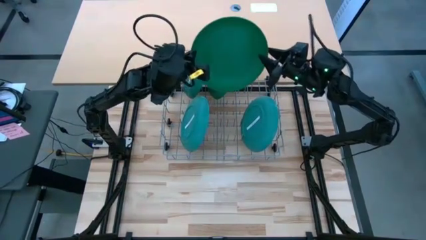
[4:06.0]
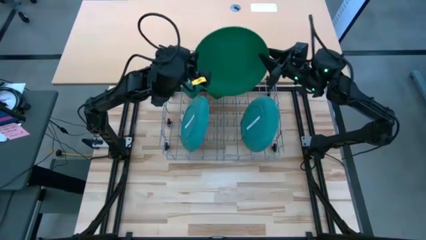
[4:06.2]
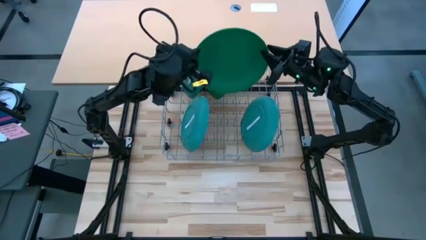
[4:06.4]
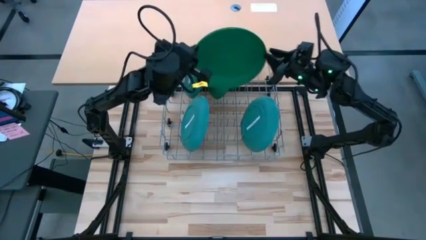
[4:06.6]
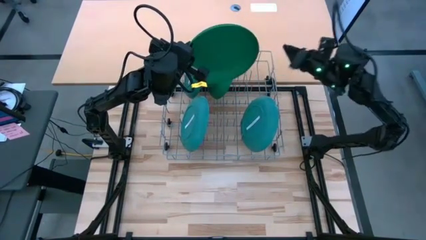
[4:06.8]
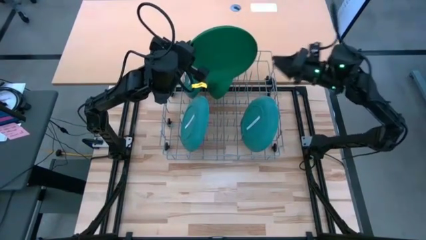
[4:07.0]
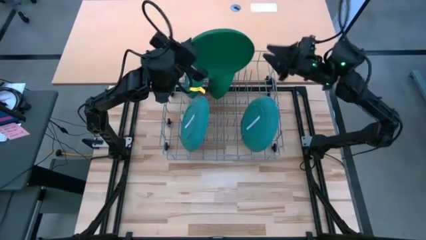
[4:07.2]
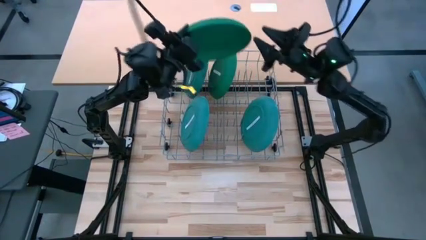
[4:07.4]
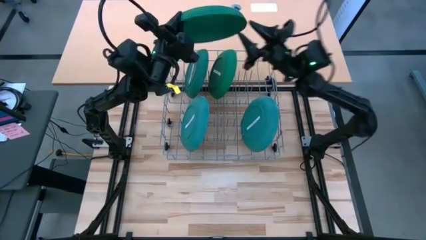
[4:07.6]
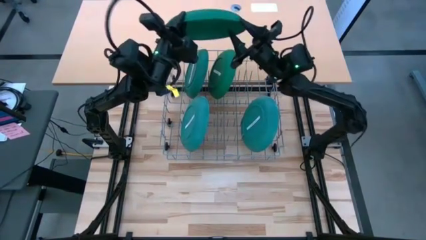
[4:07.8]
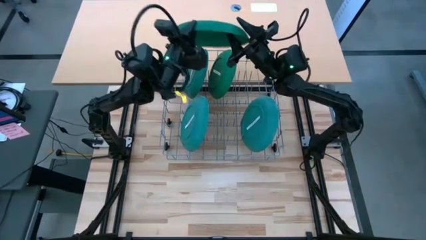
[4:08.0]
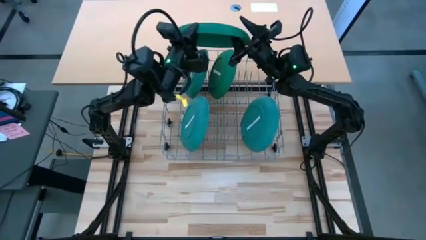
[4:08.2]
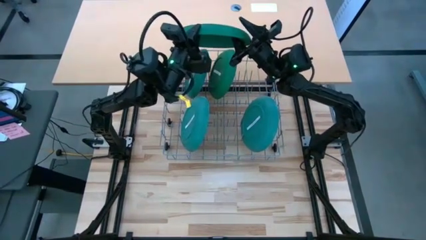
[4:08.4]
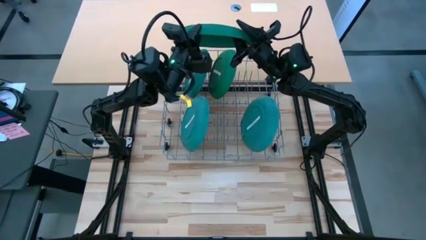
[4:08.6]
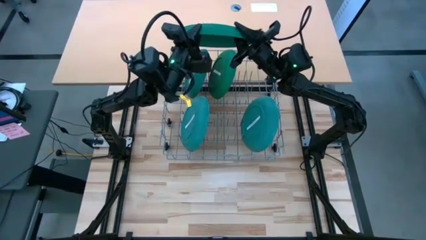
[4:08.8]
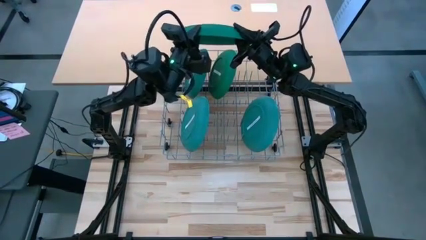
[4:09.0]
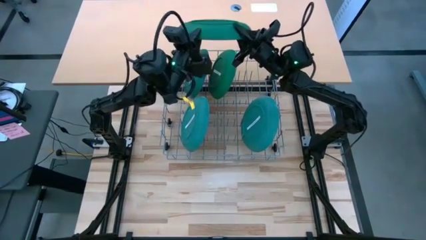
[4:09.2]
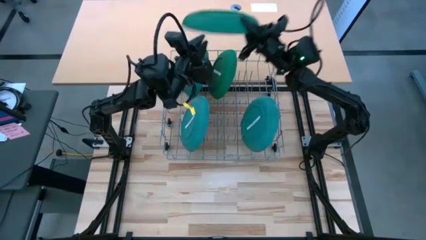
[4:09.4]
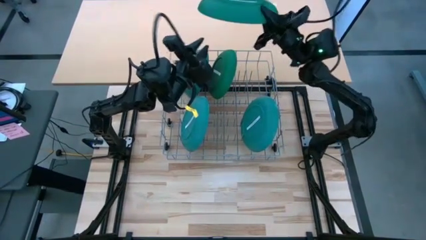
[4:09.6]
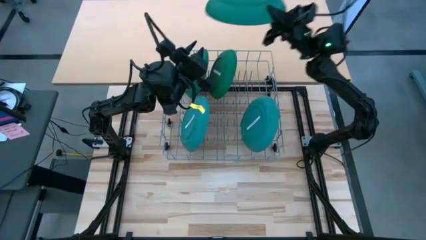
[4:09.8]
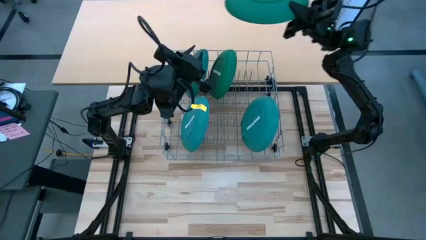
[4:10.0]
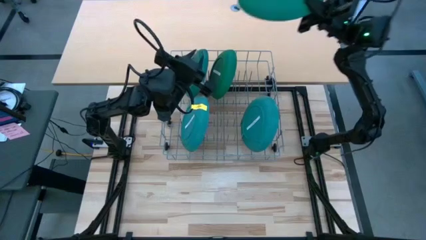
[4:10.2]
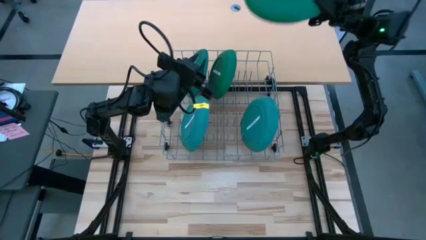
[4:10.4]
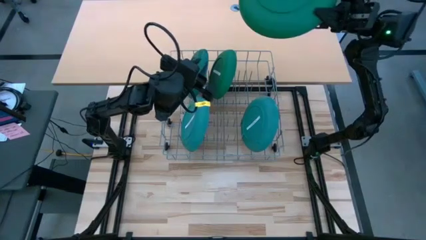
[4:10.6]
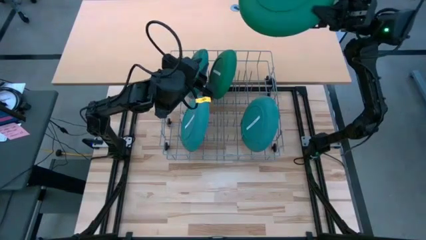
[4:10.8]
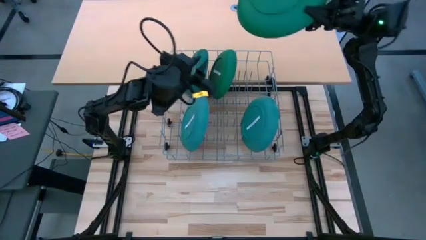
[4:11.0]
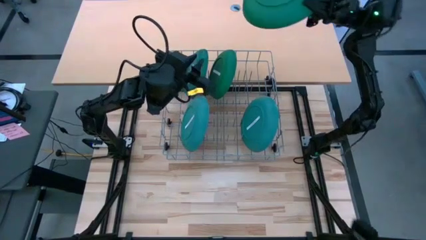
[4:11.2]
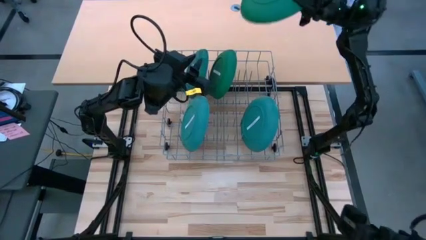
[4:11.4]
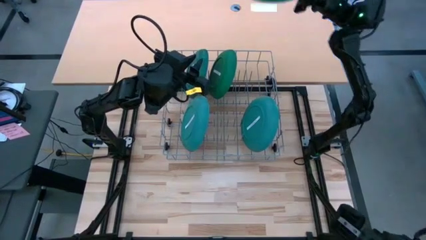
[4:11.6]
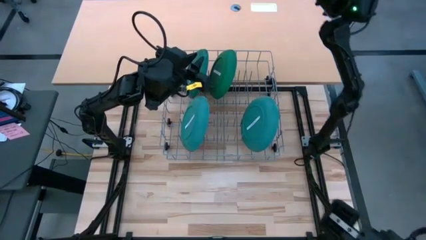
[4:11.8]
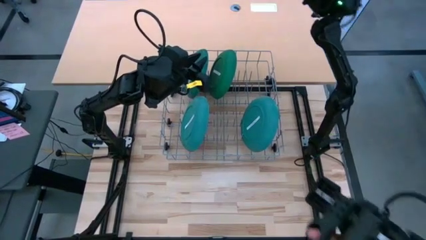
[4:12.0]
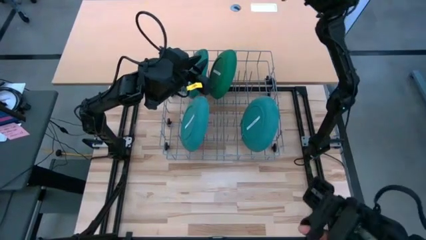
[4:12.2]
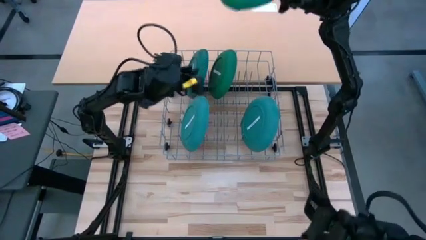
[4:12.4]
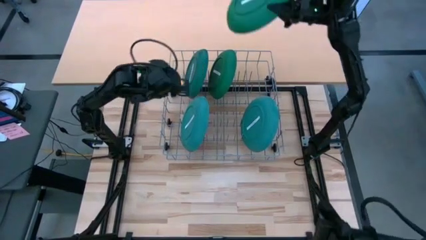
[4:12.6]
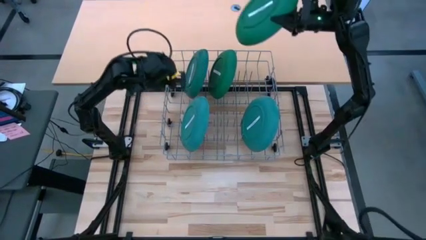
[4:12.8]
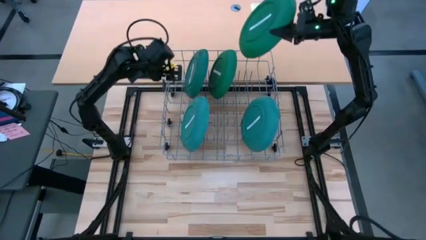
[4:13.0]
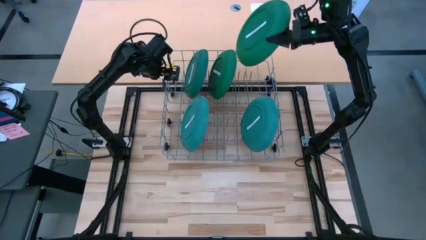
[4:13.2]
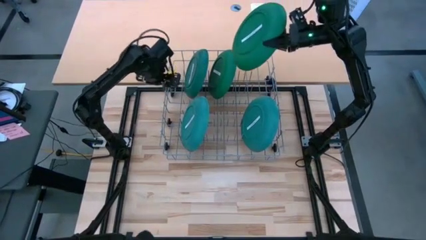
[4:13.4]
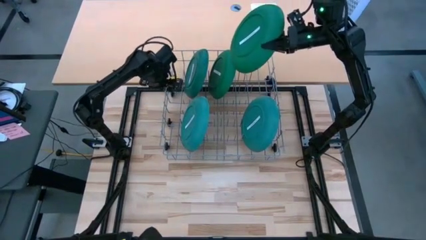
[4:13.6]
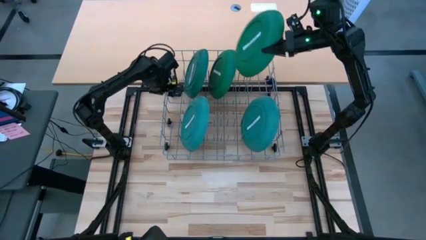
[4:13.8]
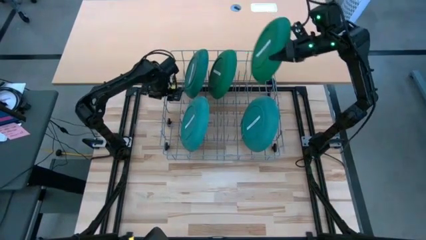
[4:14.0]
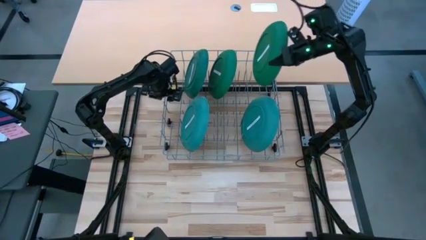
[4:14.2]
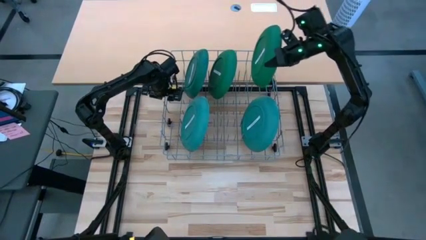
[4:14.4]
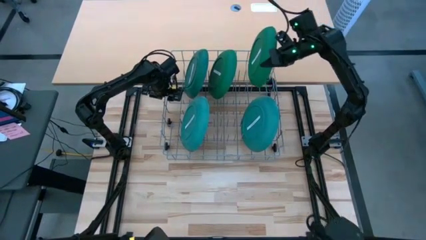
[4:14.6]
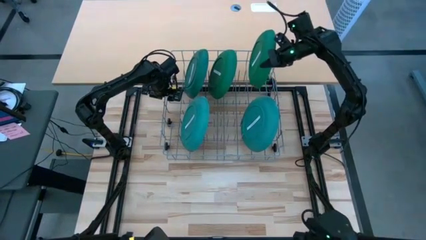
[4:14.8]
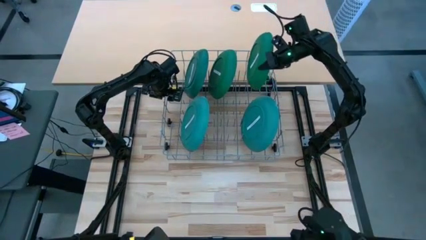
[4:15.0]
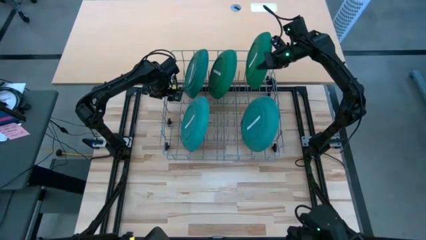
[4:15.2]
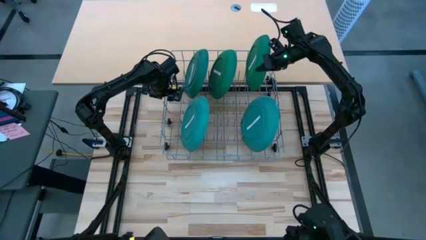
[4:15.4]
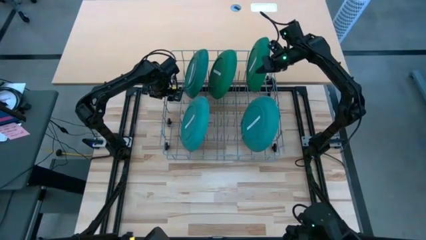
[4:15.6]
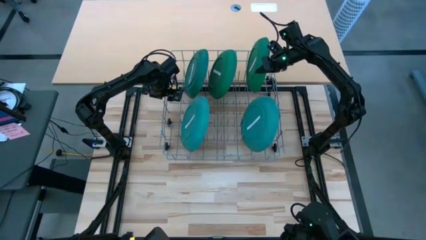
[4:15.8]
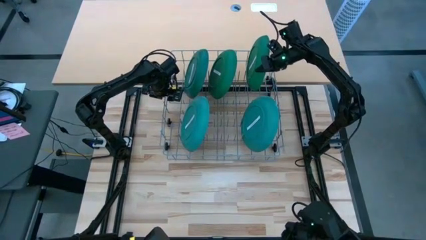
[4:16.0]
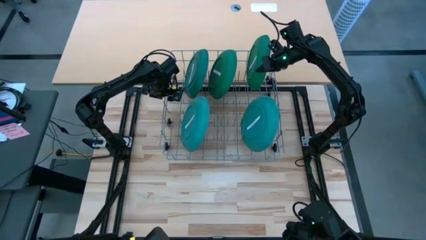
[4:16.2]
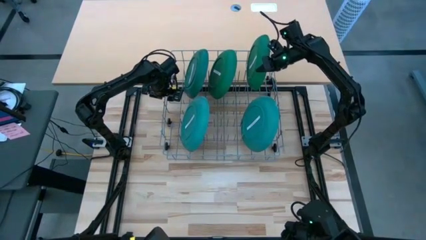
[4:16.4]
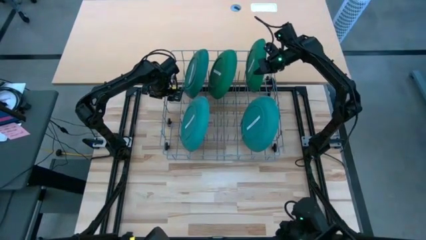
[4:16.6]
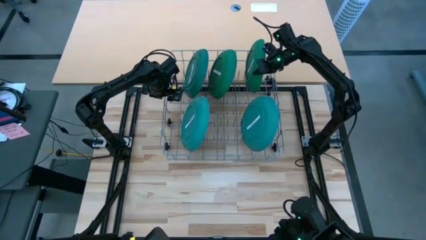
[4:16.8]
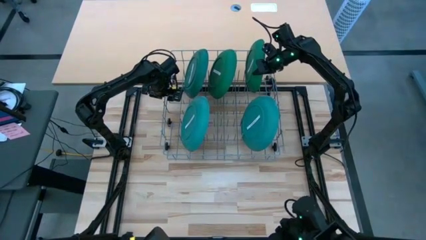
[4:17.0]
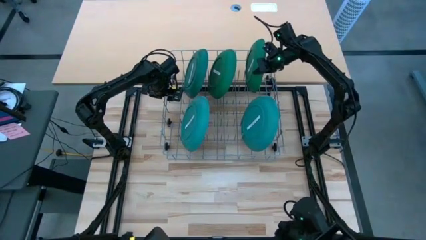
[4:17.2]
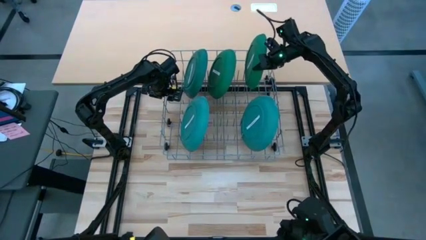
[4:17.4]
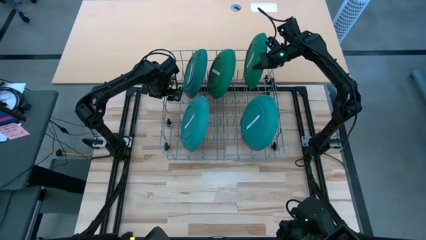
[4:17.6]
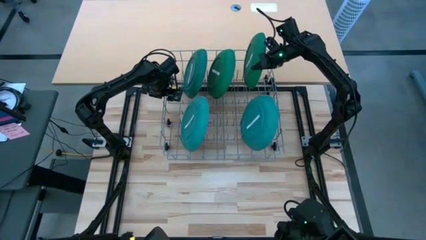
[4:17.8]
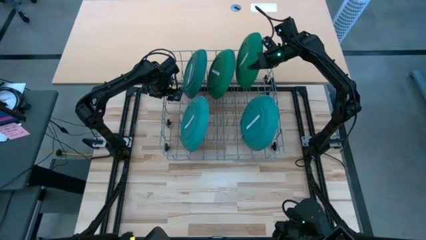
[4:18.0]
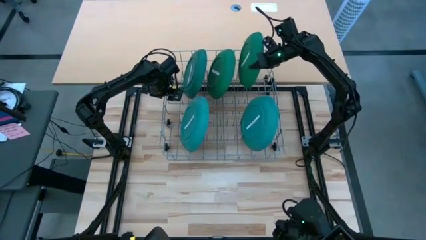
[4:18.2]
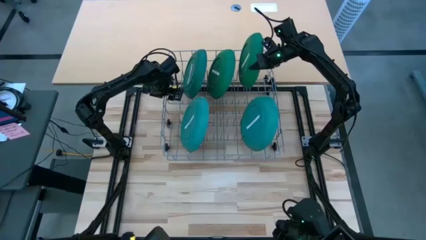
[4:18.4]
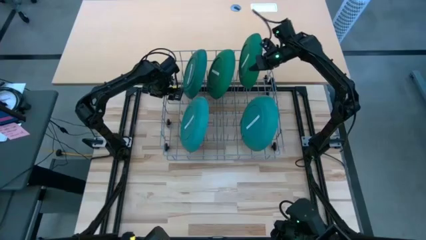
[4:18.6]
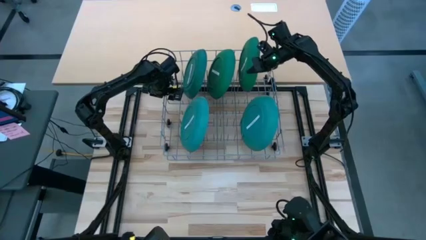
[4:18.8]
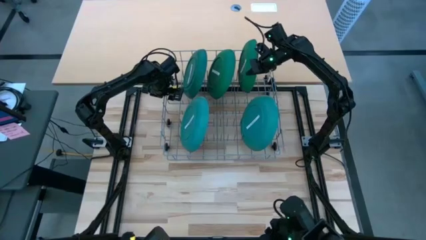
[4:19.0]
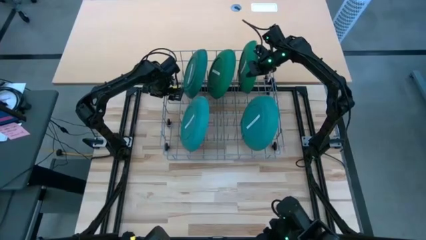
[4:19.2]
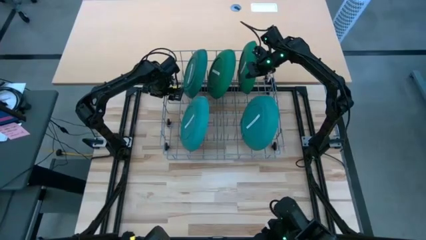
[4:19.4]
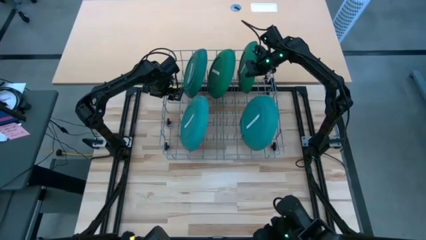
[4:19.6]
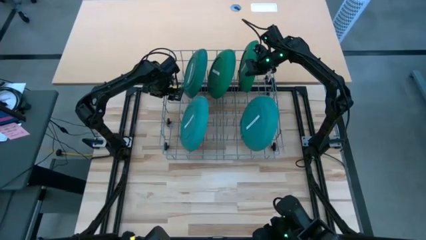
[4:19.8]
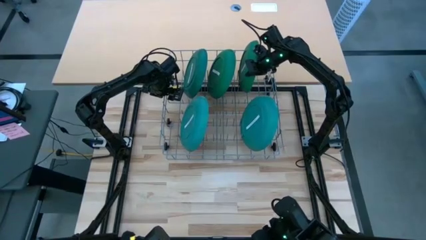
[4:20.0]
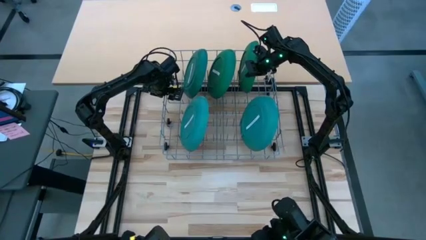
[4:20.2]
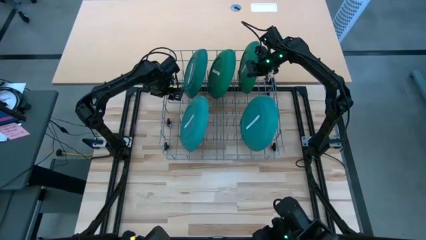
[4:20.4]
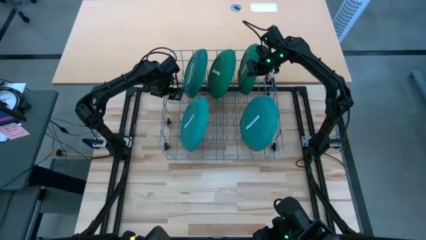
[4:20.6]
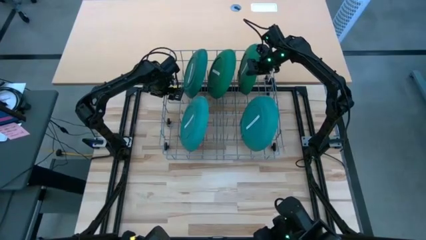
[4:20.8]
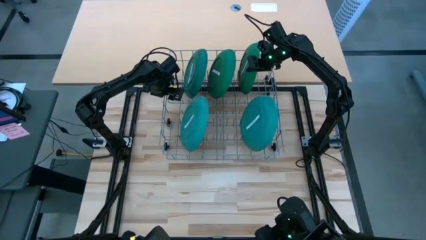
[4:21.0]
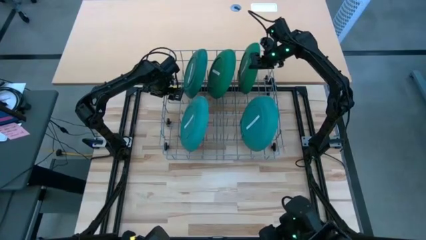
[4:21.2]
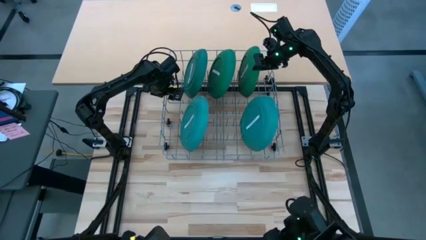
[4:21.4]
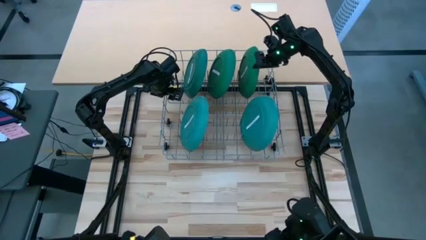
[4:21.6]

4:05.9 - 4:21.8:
Task: Sort dishes
Put the green plate into the dish rack

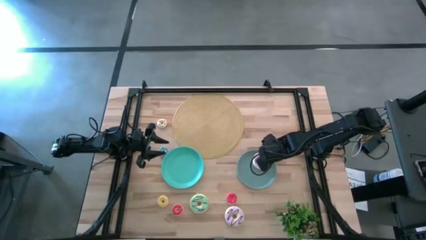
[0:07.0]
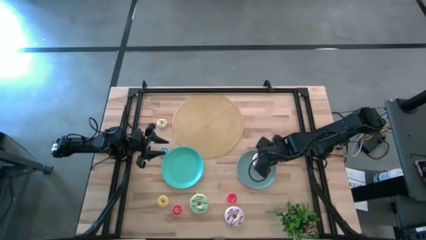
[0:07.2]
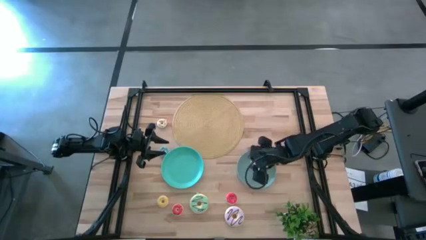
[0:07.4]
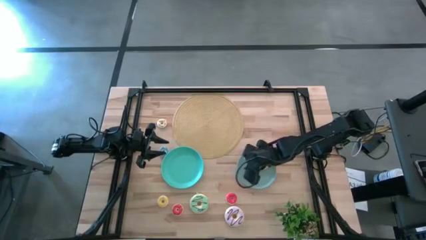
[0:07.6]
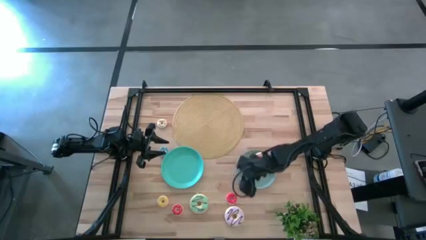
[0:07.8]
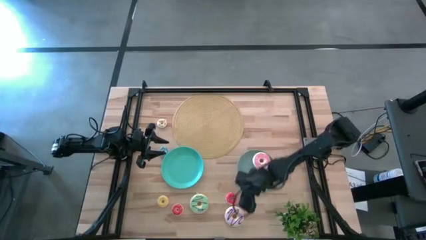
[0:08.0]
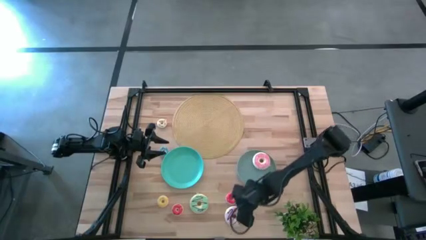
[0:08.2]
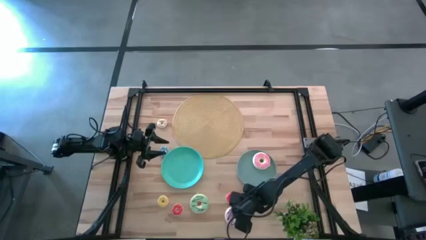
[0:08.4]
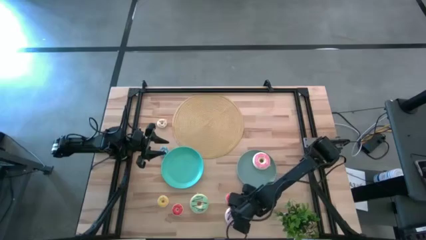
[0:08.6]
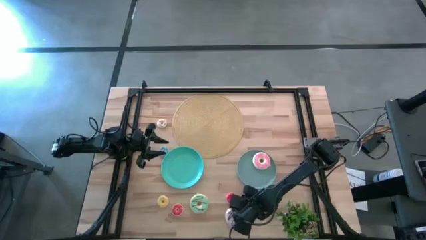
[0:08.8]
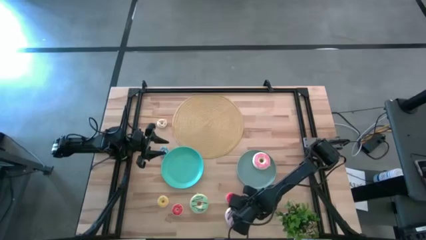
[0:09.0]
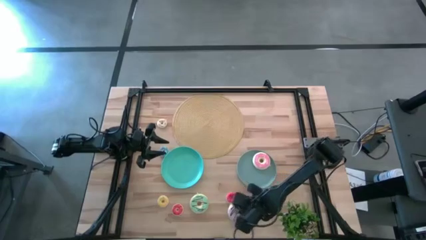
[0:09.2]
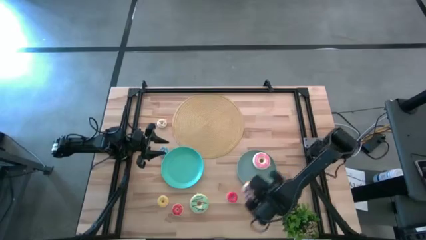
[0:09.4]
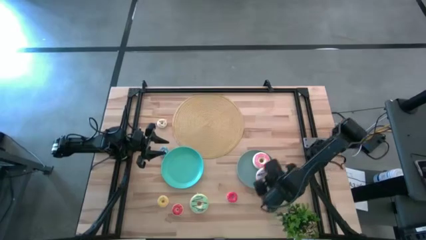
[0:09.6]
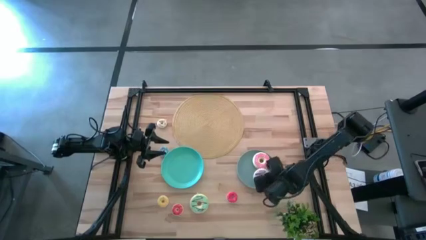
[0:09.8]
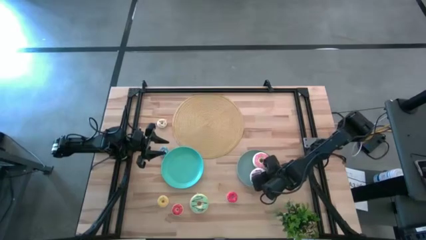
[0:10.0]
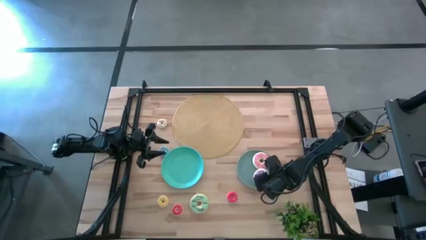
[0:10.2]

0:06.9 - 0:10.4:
Task: Pick & Place donuts
Put the big purple donut on the blue plate
